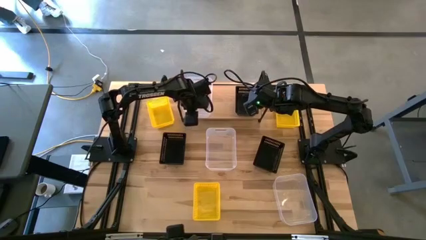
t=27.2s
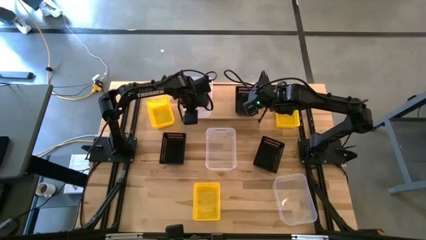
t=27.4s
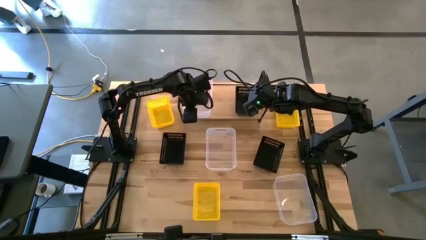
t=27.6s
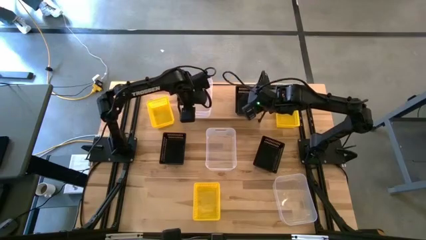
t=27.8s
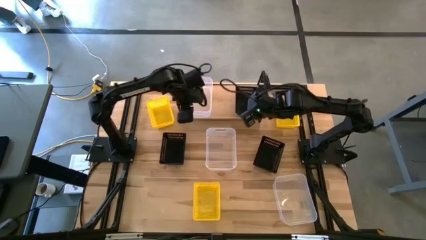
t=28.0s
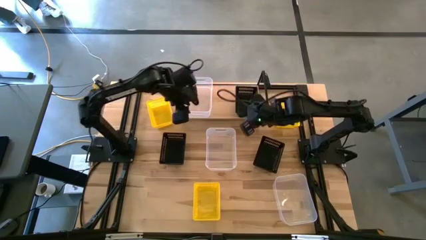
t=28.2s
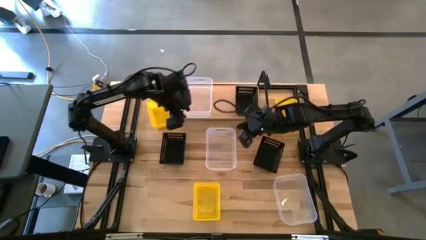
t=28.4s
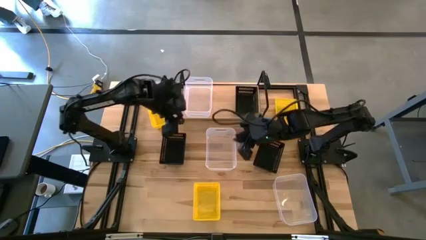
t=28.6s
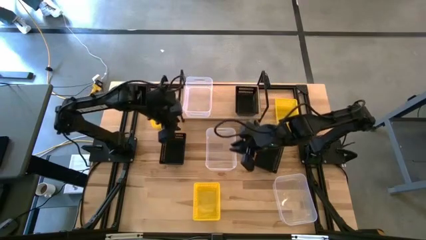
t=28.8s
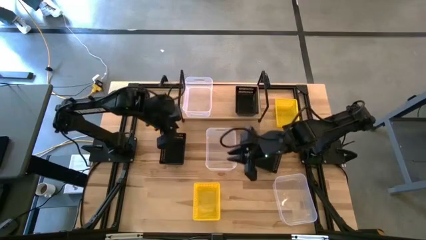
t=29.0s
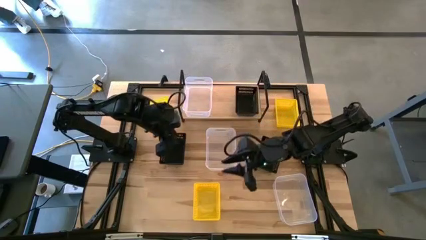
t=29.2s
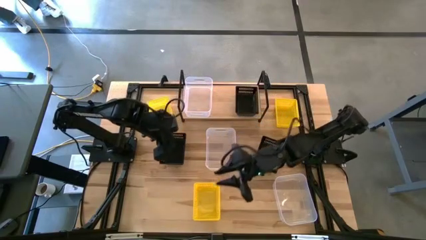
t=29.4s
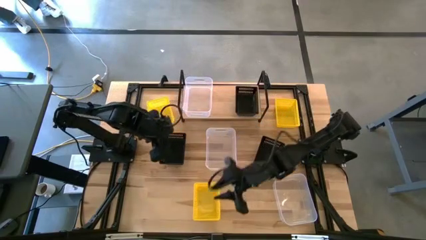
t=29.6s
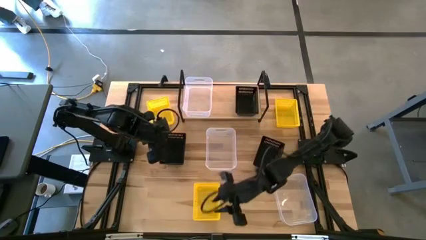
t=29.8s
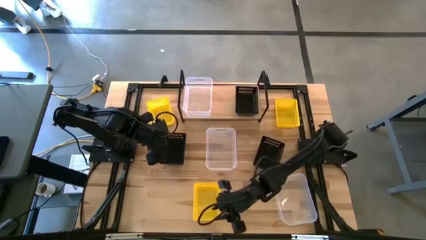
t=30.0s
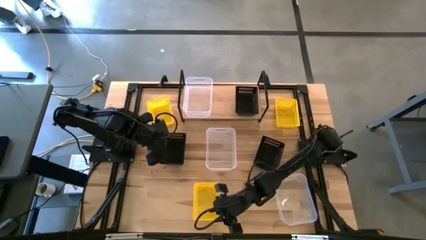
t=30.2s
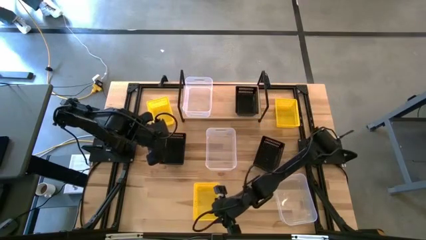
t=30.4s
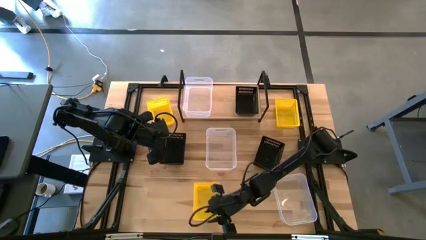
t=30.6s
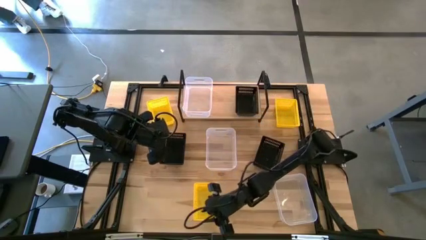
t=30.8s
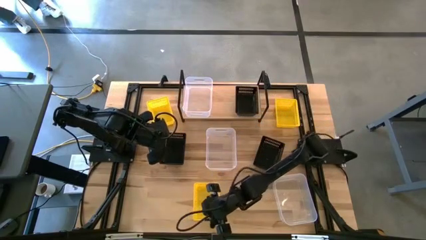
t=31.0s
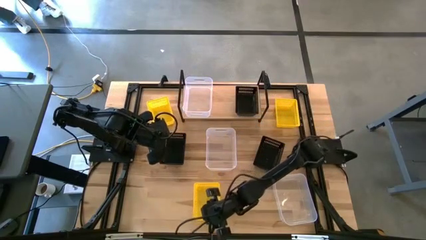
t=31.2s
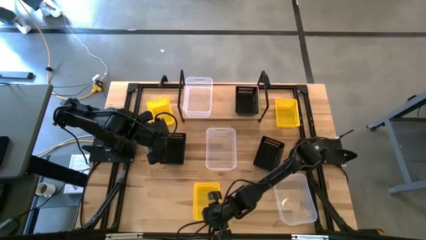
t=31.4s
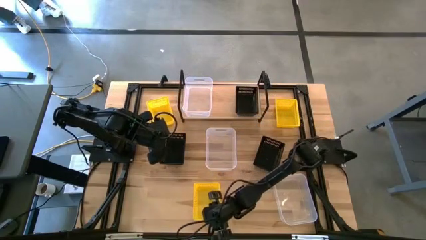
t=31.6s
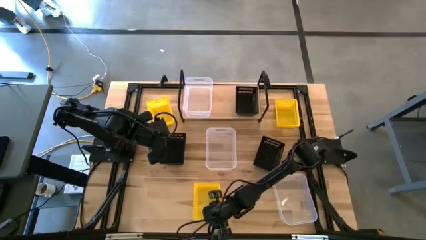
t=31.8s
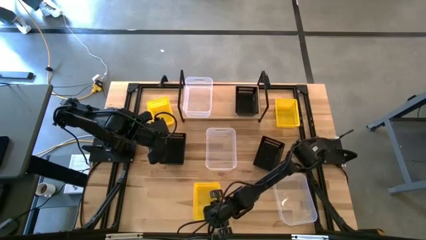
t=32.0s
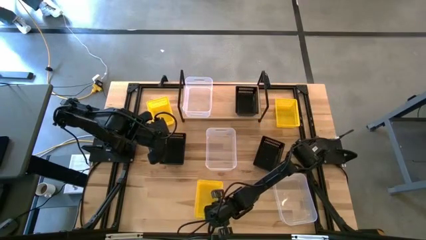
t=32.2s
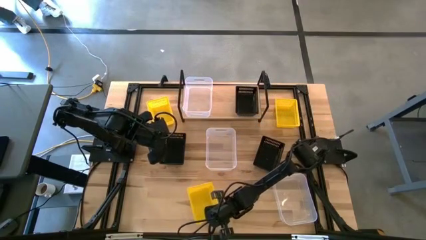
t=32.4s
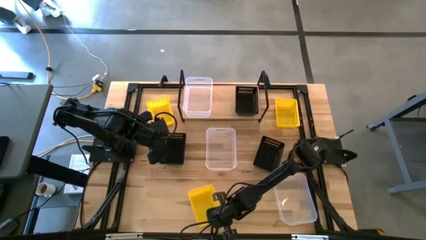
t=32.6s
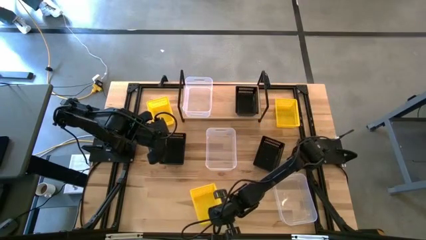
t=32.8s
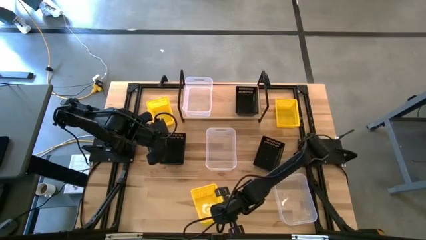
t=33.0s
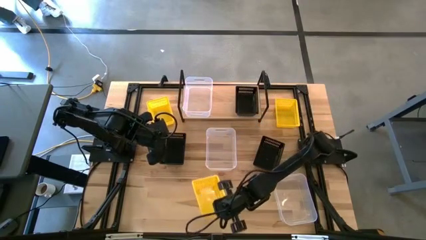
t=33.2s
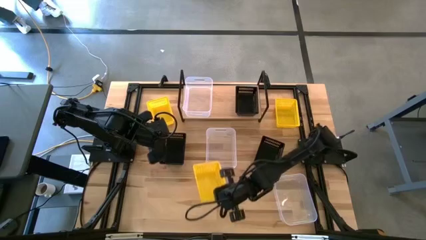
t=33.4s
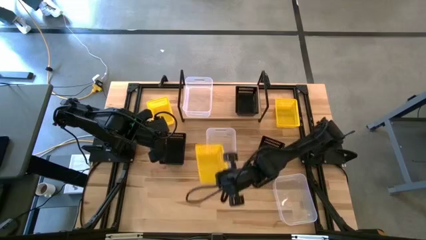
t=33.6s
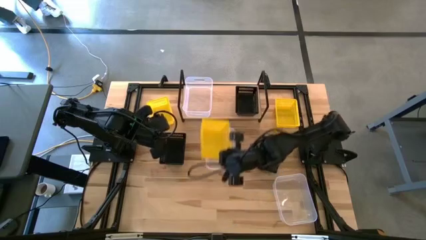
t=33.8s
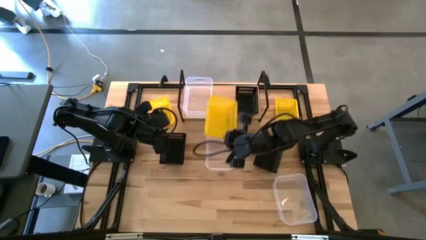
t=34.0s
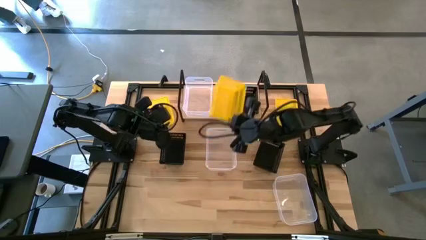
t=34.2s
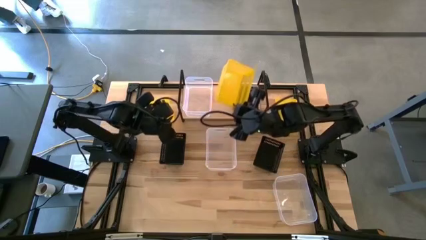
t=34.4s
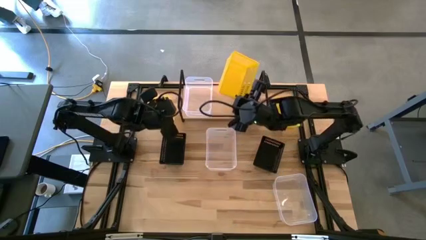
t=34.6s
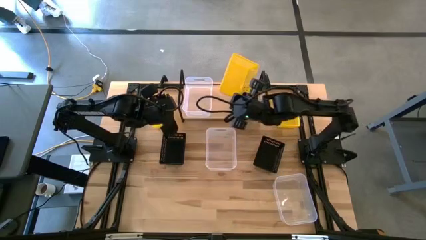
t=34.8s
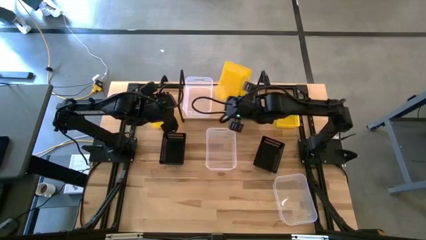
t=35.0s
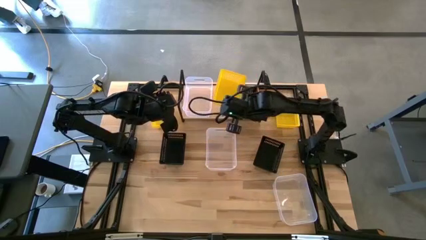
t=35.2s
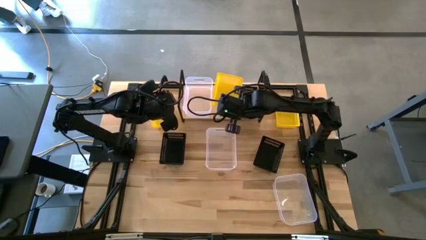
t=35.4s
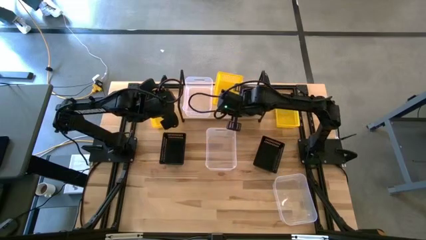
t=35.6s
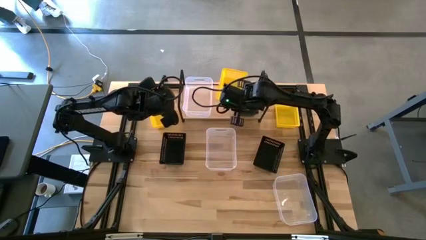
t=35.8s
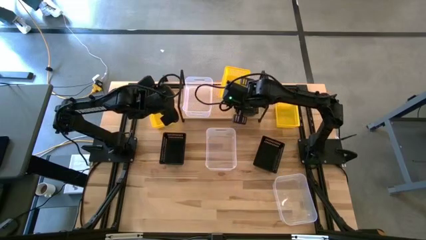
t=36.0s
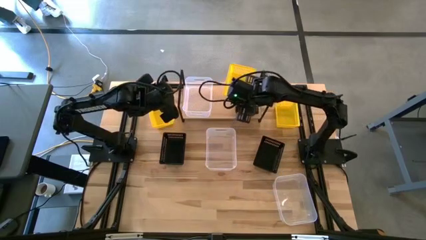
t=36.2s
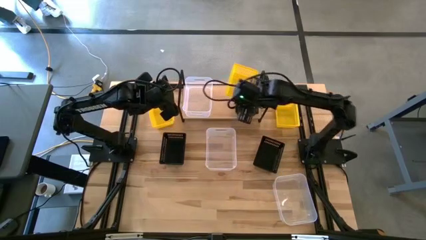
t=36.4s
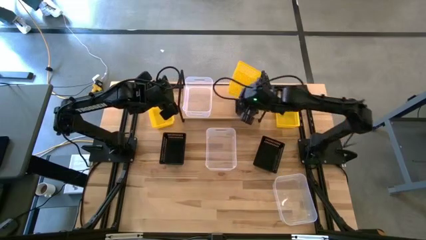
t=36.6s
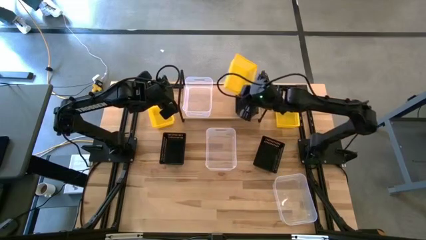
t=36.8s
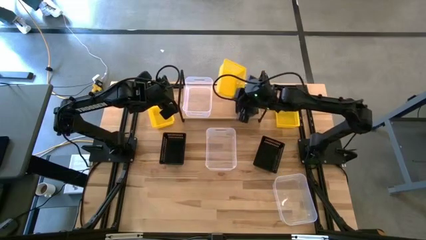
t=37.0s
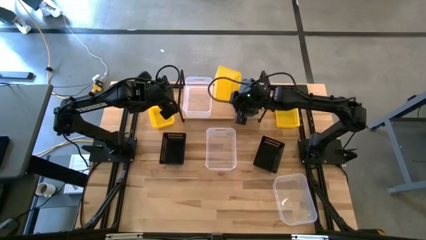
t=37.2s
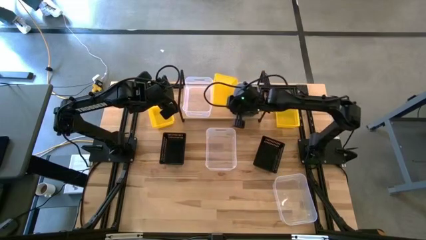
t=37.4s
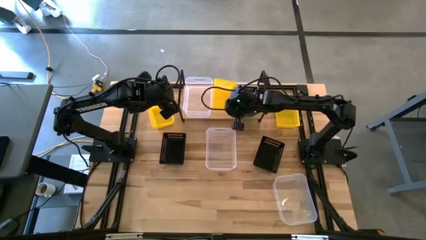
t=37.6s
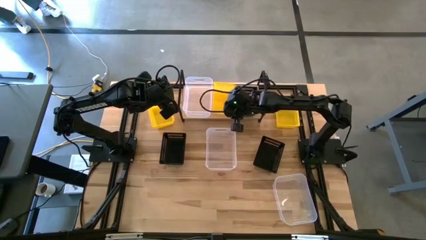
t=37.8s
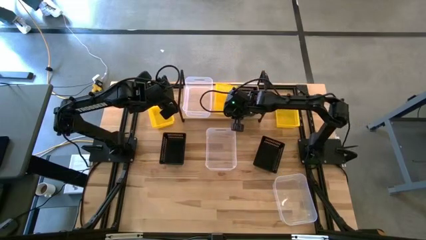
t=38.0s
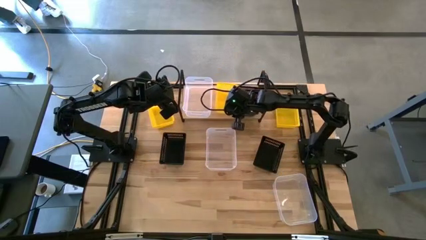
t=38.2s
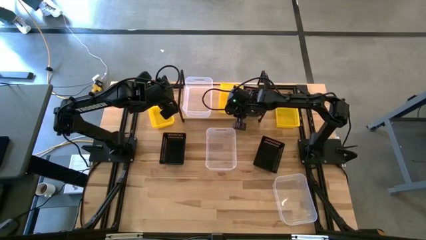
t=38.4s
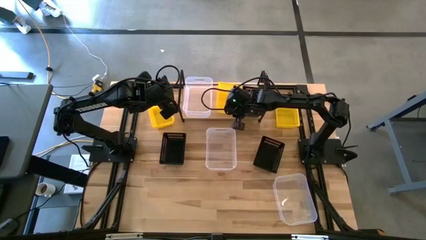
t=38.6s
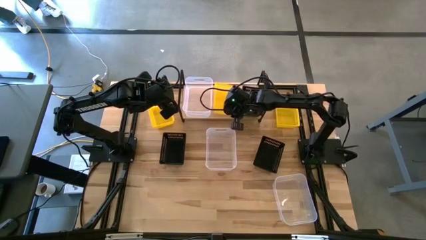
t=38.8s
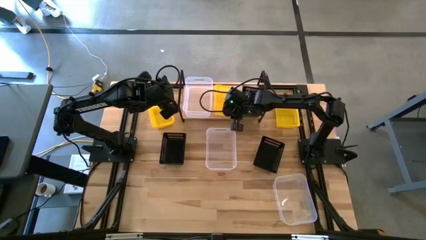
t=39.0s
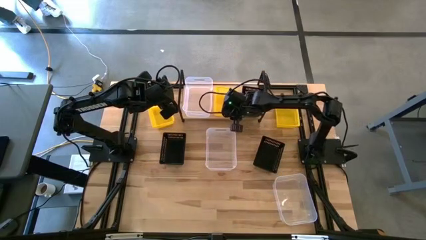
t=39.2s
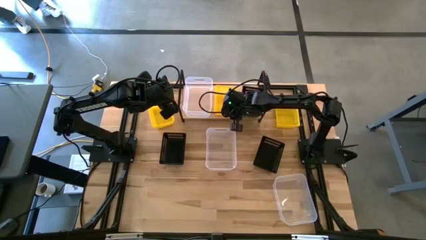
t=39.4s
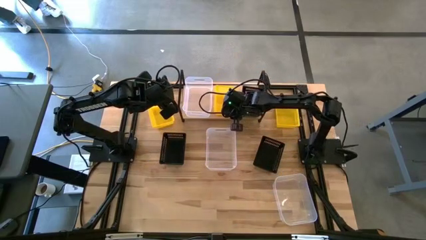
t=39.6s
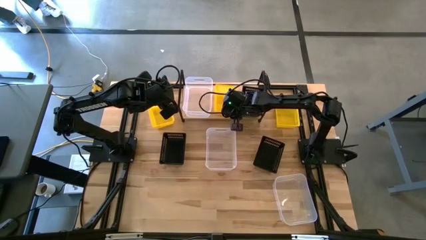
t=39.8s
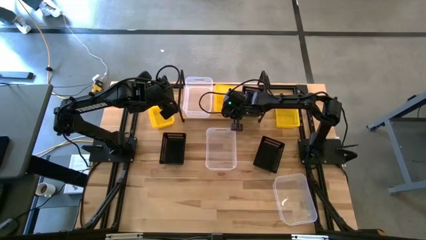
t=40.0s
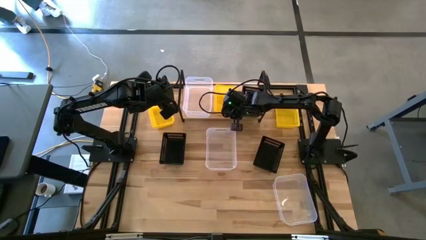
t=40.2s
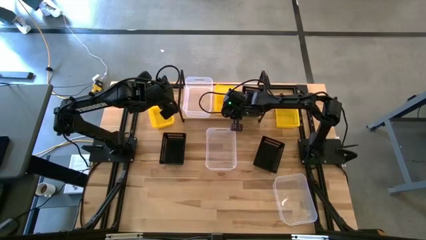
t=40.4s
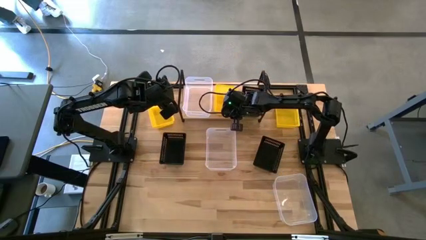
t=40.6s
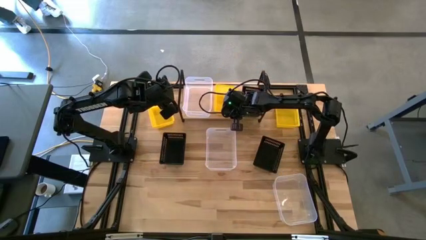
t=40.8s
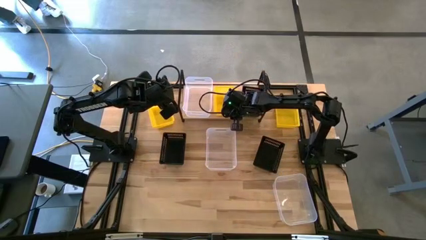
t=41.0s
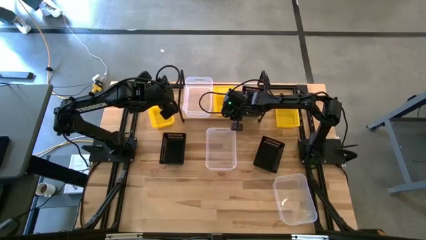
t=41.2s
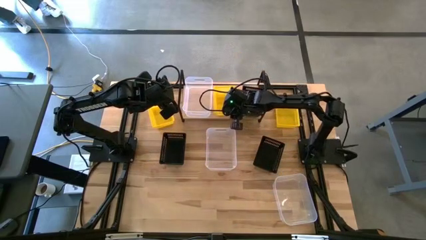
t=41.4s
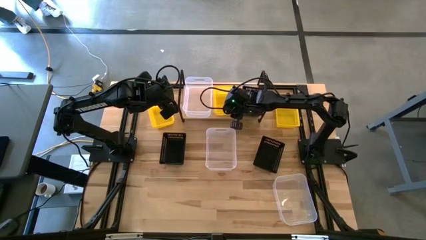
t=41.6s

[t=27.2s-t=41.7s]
Task: Stack baskets on shelf by color
Put the bottom yellow bin on the shelf
